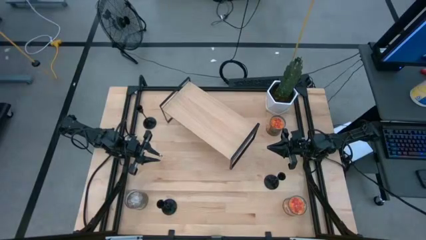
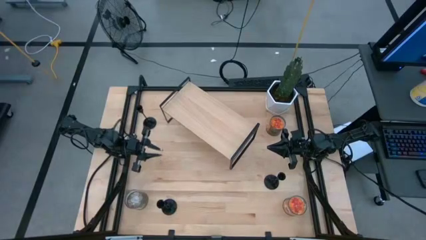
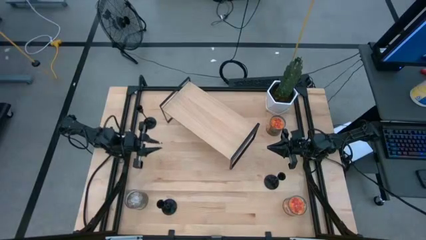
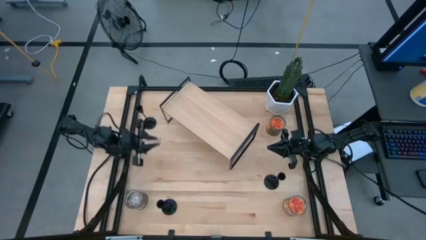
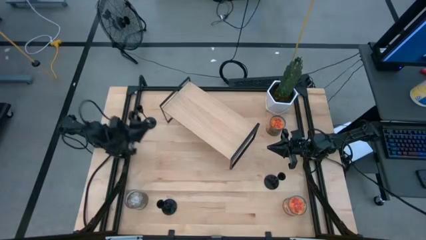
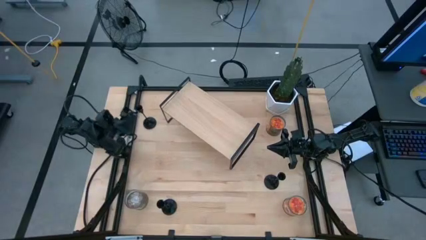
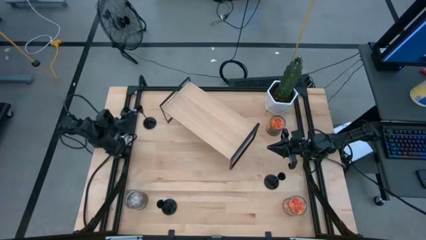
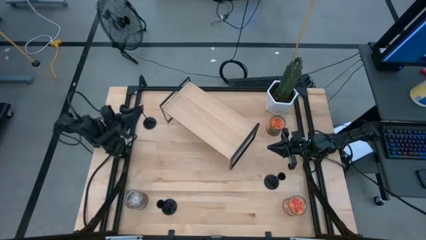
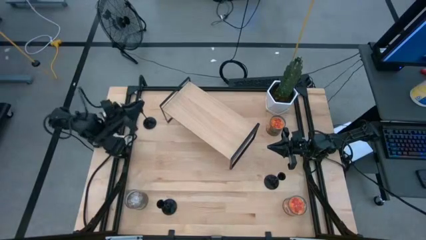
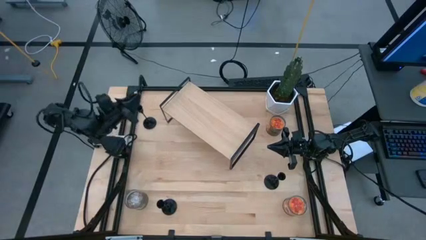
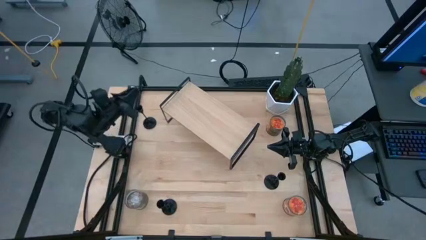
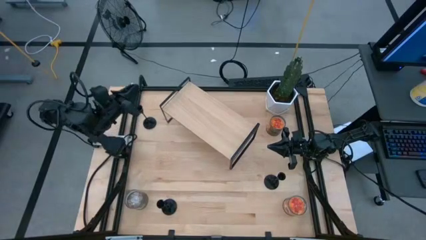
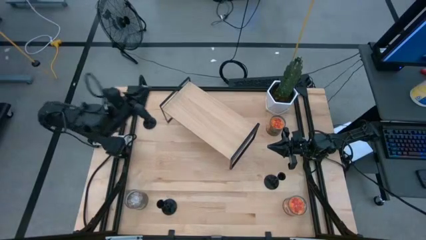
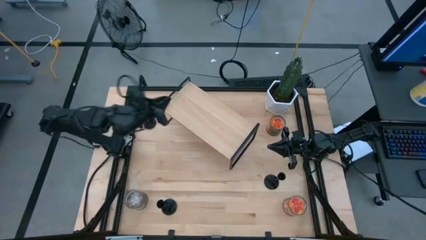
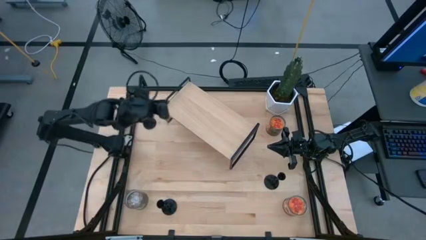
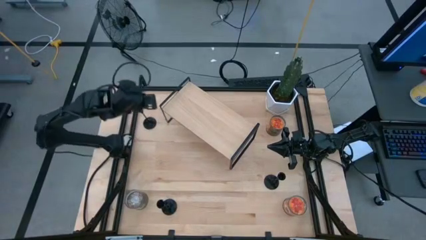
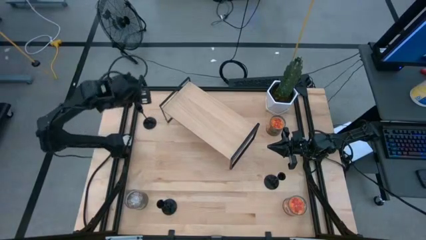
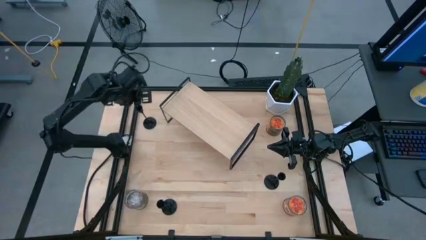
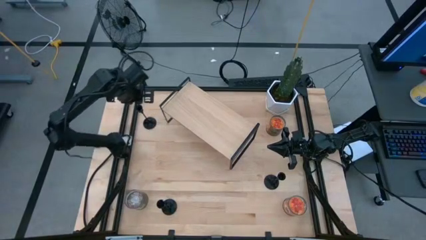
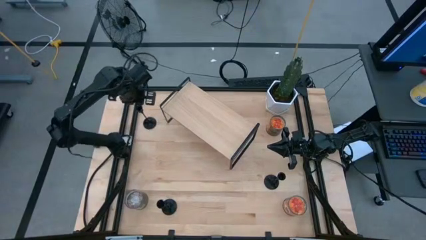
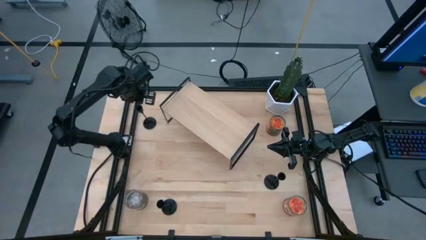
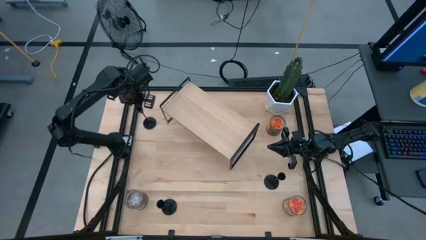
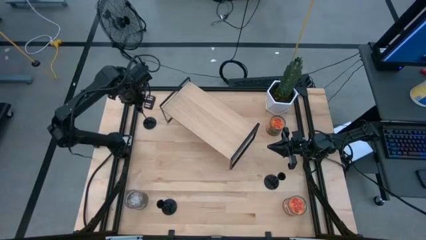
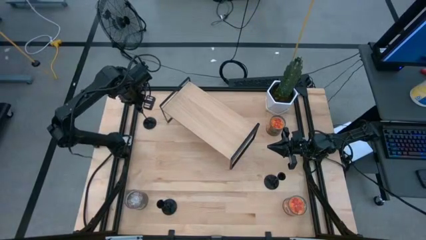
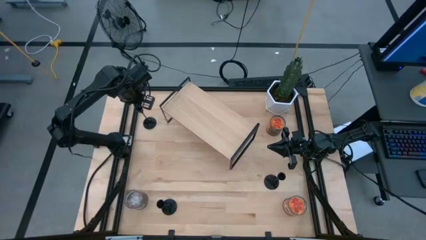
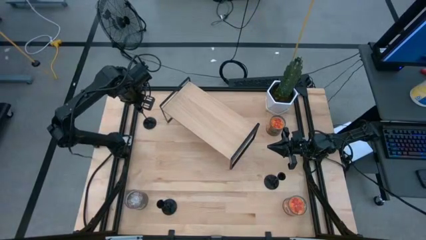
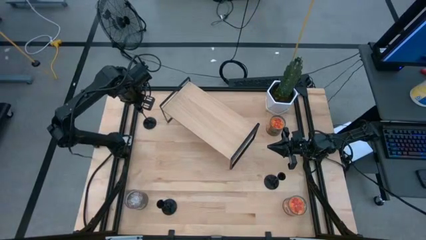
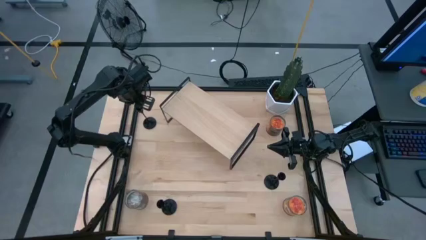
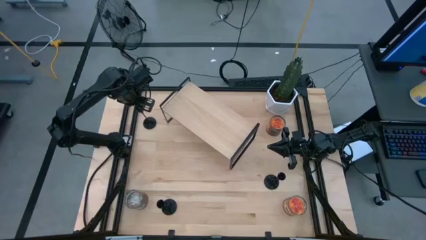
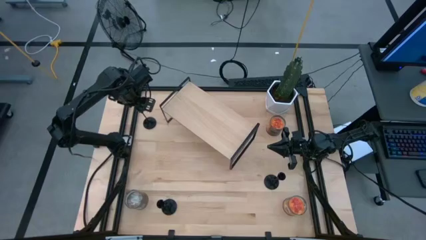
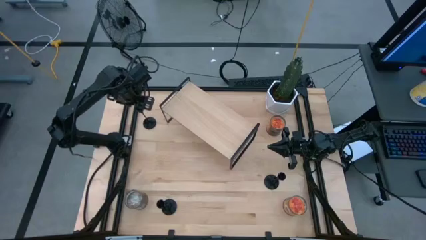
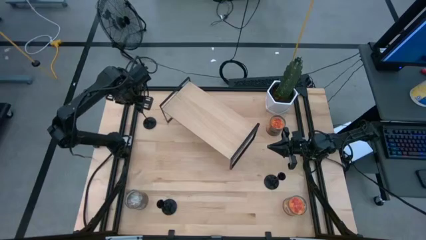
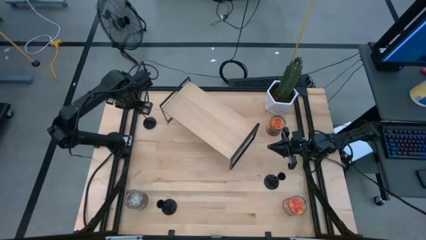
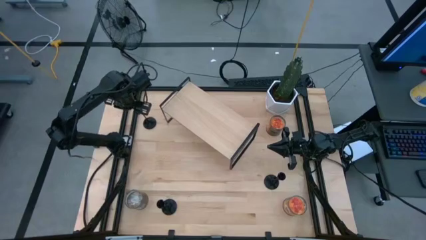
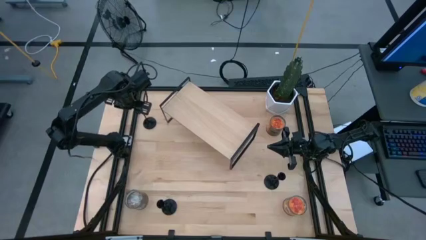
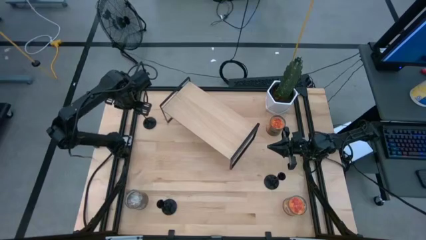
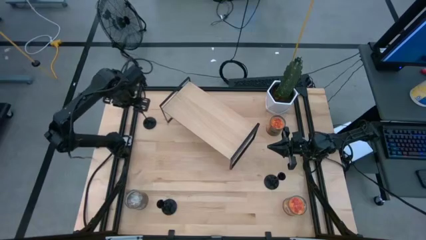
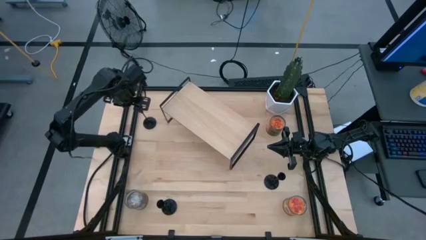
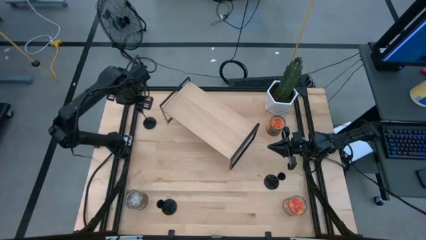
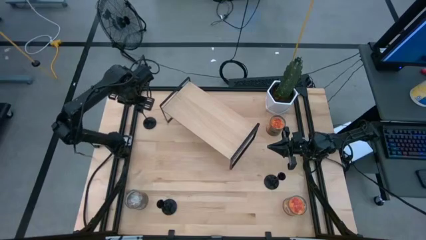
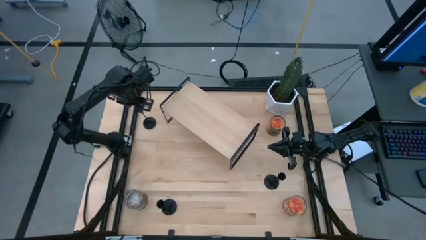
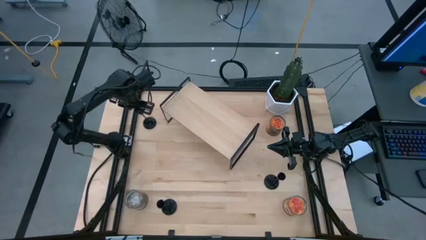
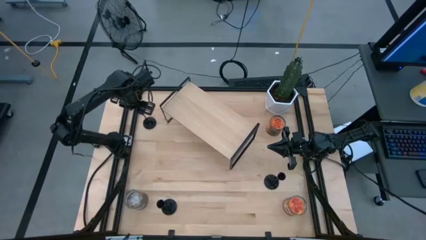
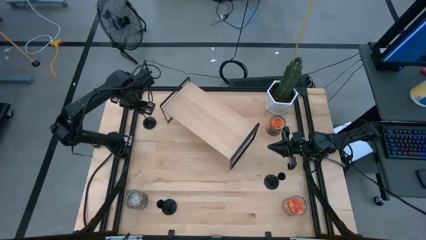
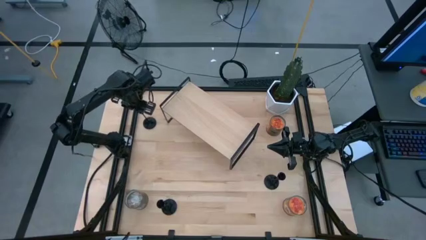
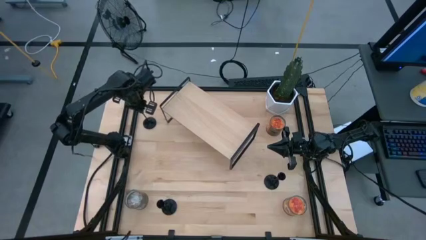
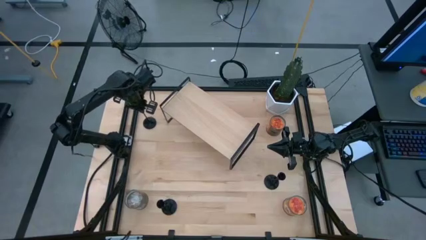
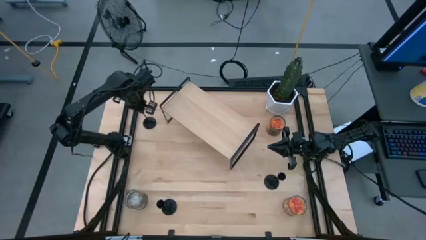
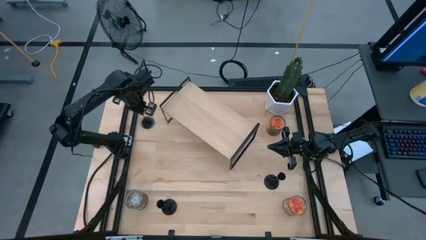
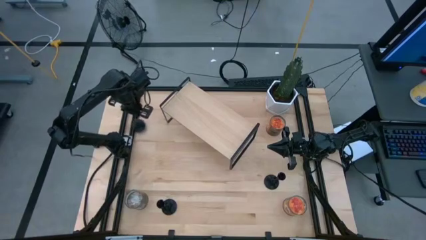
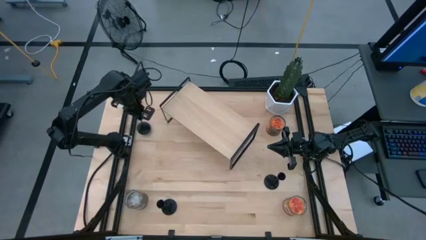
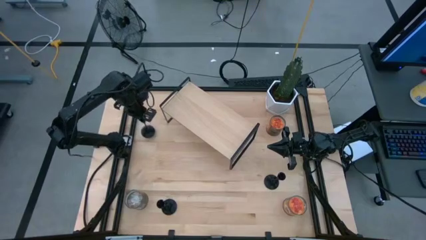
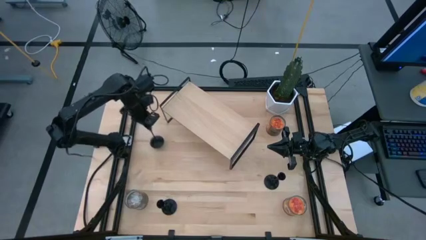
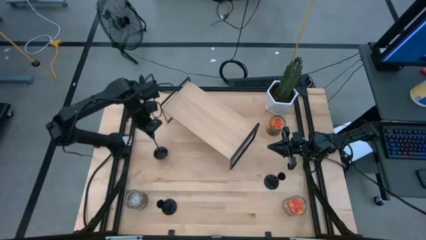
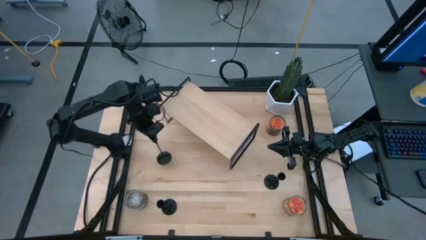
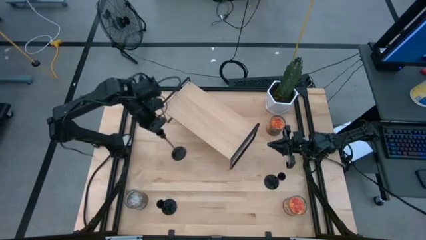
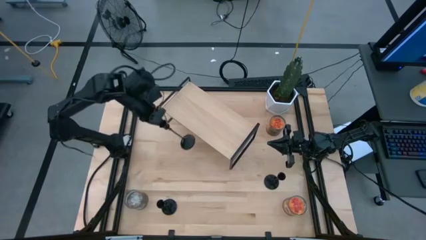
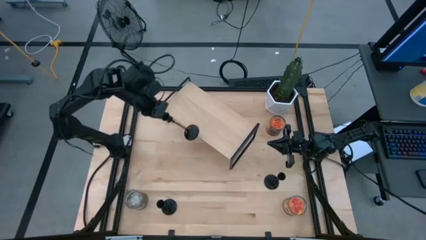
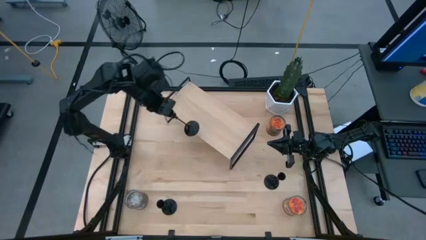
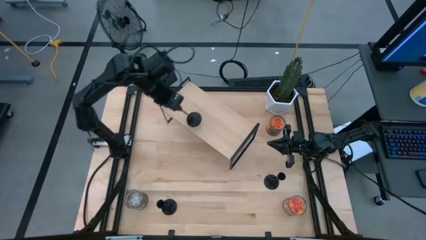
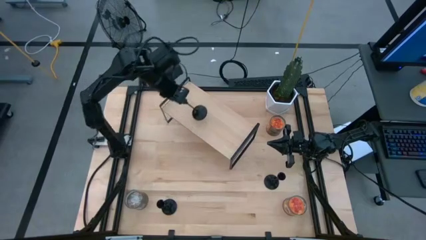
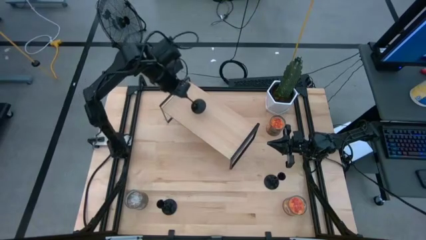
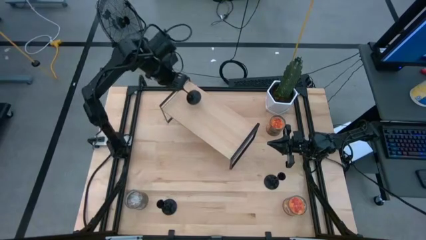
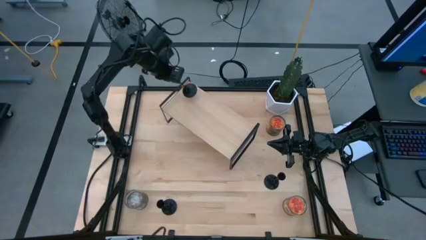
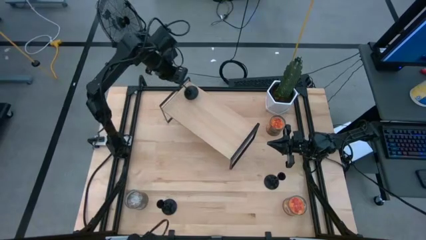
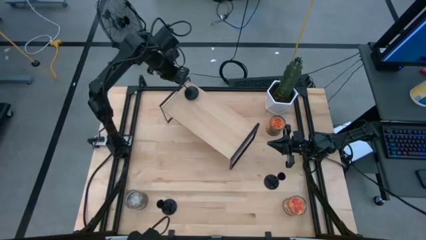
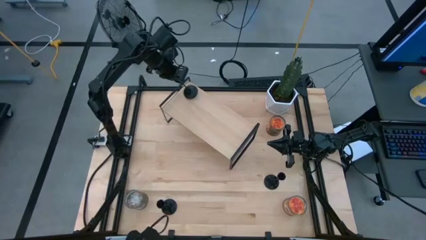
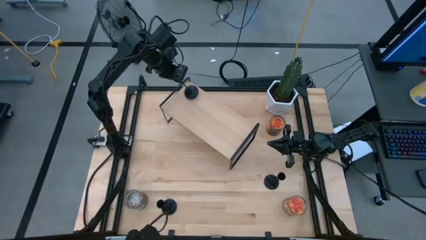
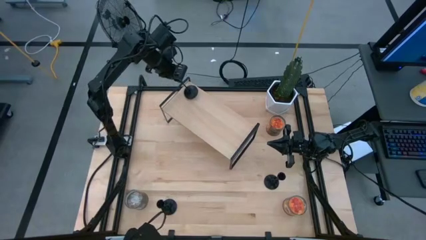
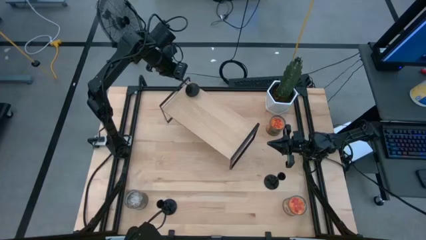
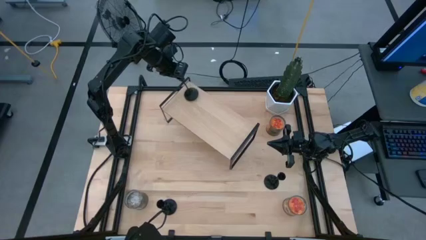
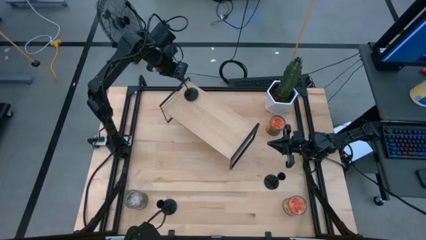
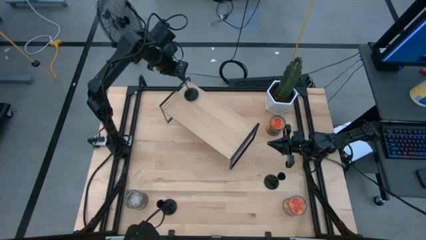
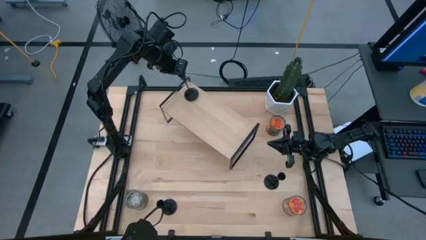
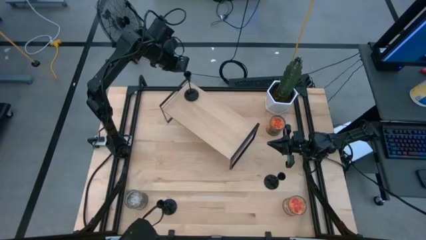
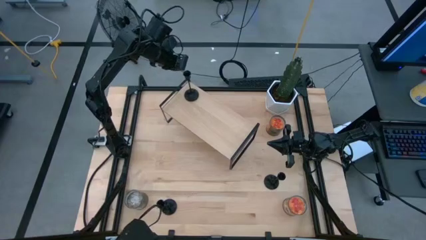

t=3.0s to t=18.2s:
Task: Pick & Place candle stick holders
Put the top black candle holder on the shelf
